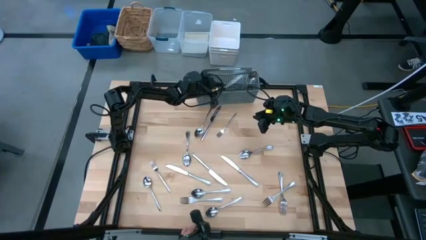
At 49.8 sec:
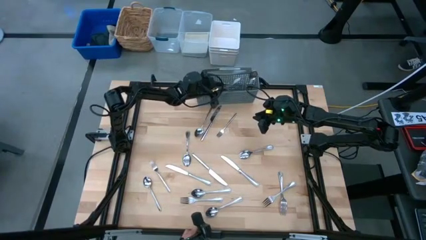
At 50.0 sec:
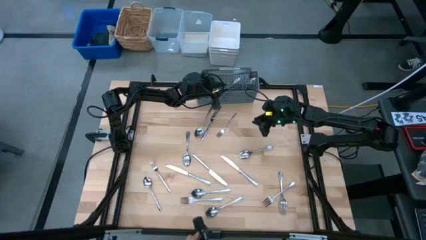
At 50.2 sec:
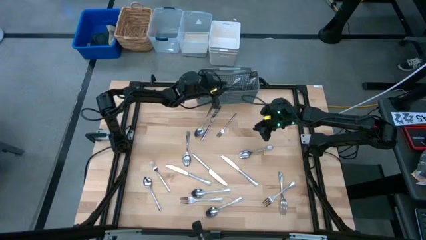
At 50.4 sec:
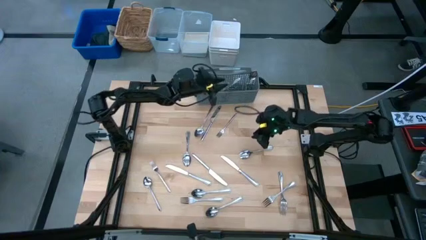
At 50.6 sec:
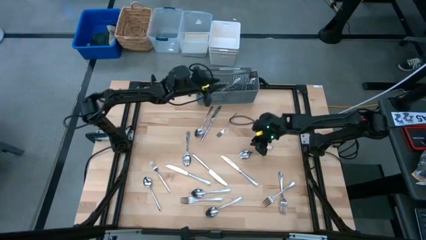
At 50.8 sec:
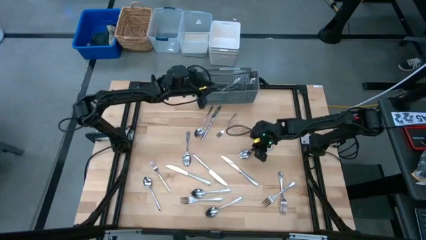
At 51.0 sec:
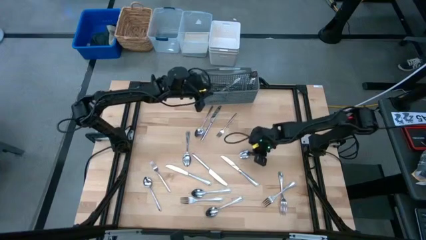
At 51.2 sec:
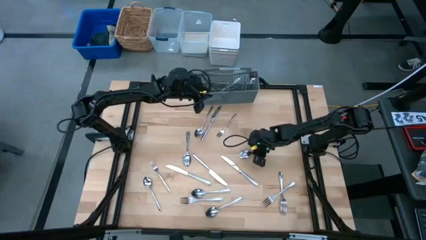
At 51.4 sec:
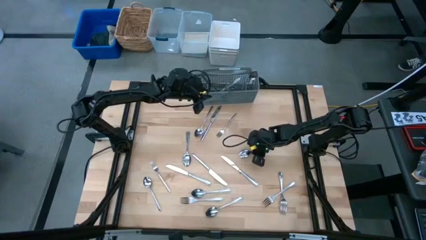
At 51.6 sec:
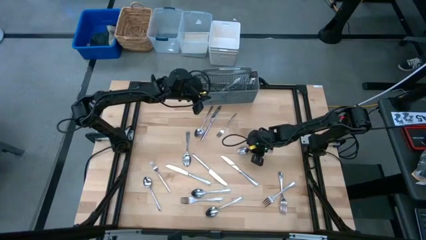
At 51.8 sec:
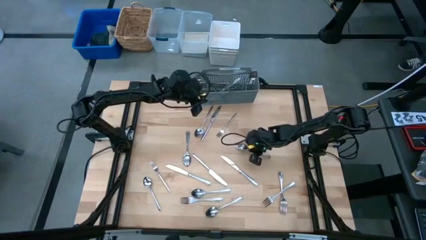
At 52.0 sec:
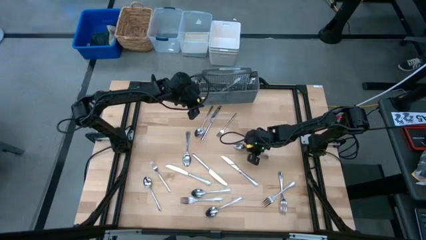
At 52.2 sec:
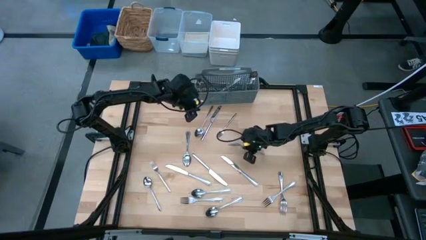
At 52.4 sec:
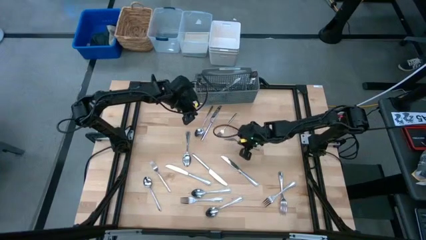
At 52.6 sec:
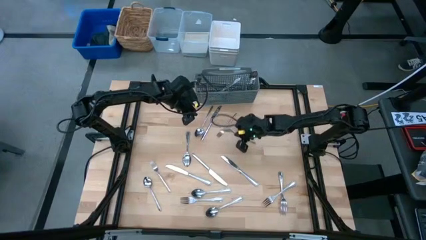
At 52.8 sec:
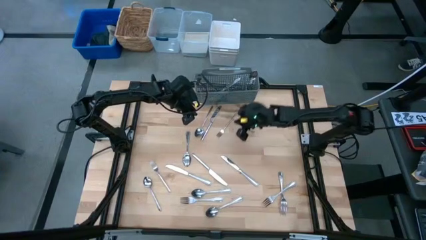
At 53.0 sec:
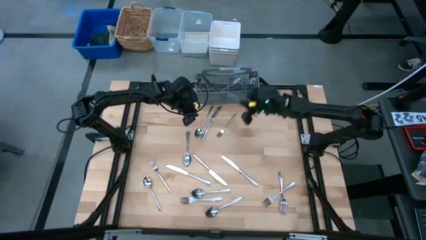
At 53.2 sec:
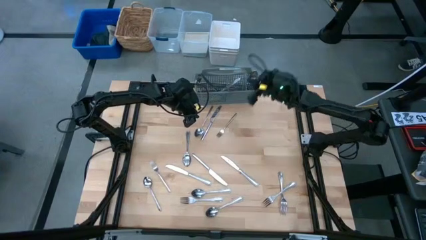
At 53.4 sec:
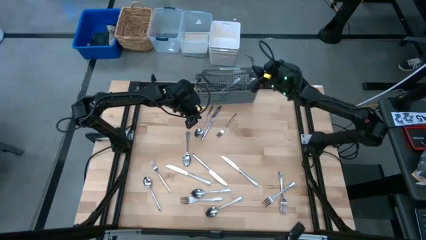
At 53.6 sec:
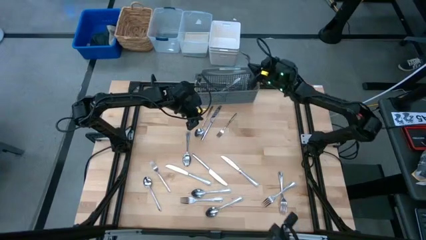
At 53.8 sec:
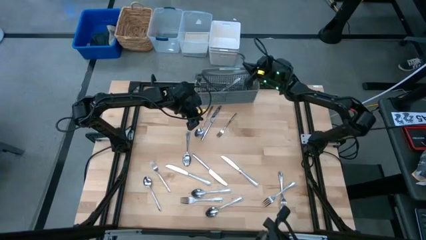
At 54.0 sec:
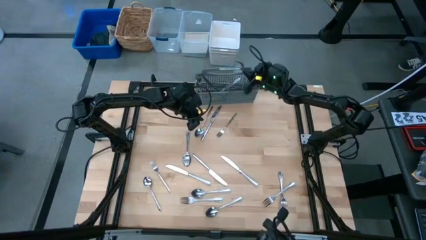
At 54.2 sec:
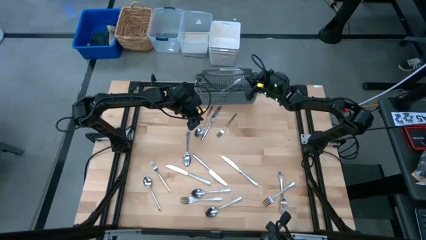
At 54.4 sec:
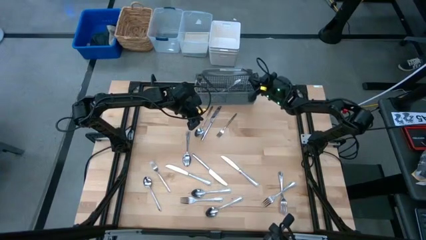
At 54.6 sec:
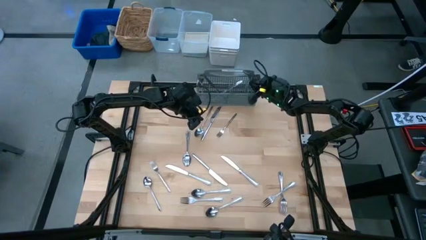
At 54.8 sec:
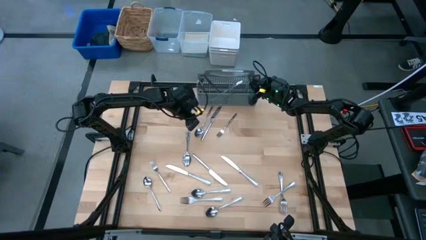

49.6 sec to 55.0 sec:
Put the silver spoon into the dishwasher utensil holder

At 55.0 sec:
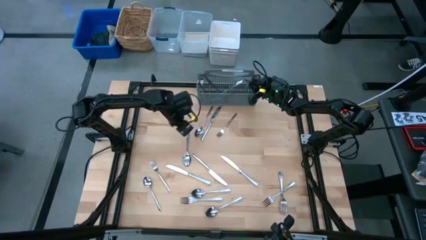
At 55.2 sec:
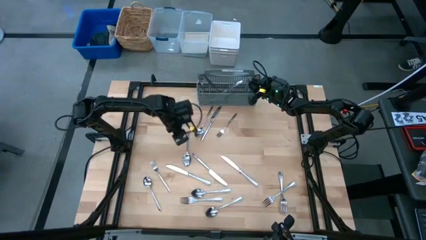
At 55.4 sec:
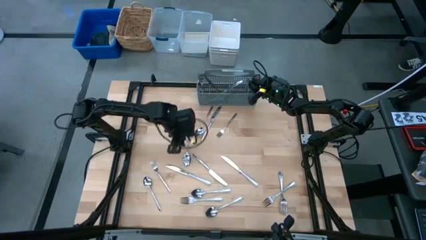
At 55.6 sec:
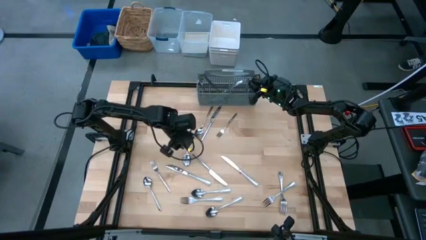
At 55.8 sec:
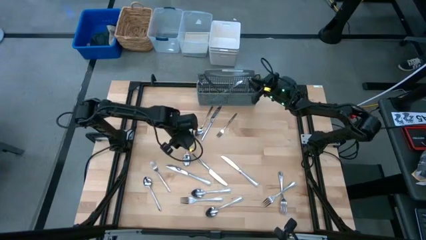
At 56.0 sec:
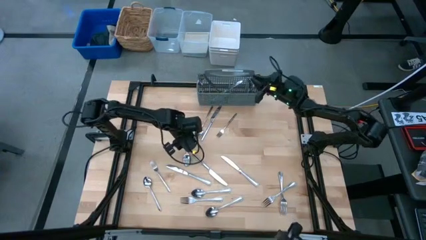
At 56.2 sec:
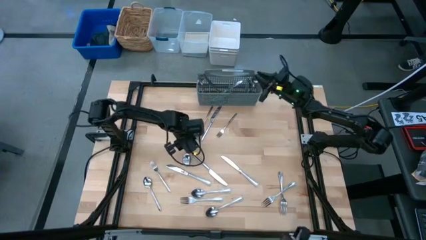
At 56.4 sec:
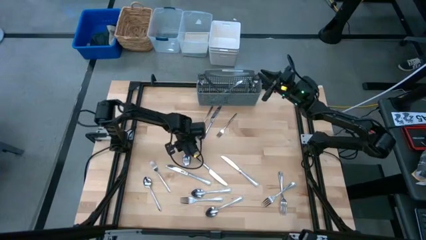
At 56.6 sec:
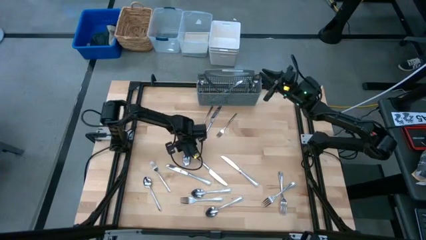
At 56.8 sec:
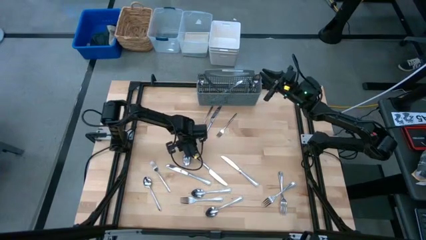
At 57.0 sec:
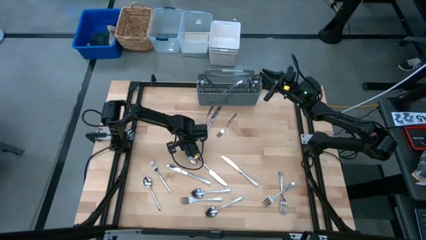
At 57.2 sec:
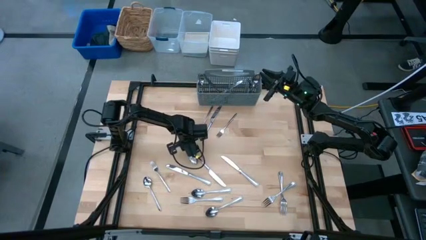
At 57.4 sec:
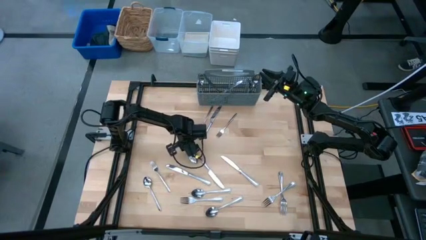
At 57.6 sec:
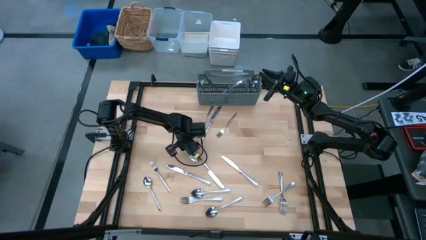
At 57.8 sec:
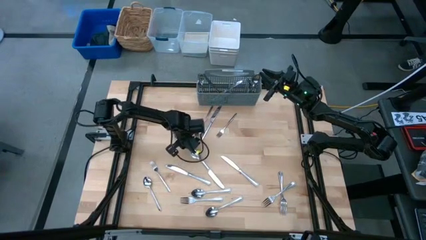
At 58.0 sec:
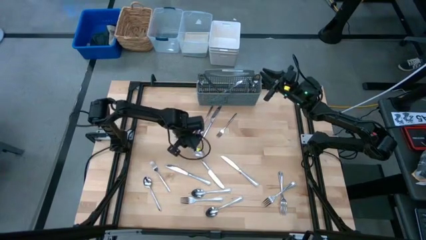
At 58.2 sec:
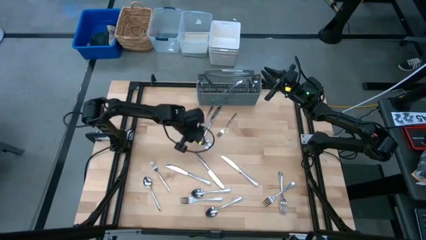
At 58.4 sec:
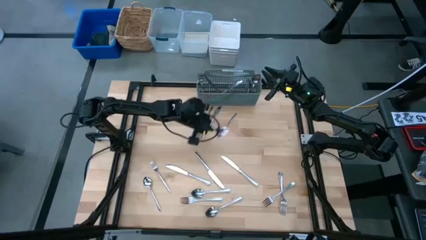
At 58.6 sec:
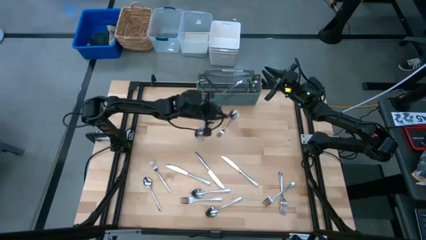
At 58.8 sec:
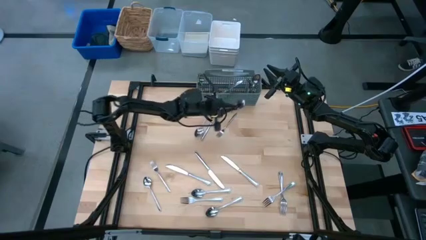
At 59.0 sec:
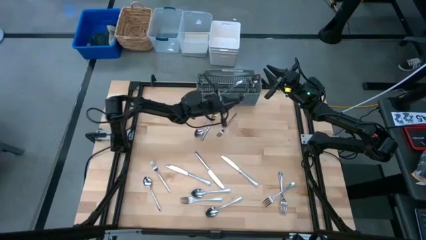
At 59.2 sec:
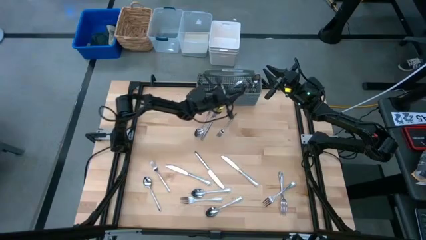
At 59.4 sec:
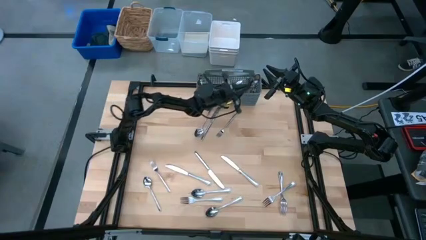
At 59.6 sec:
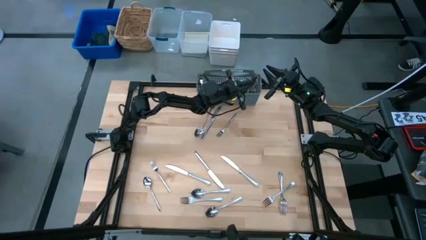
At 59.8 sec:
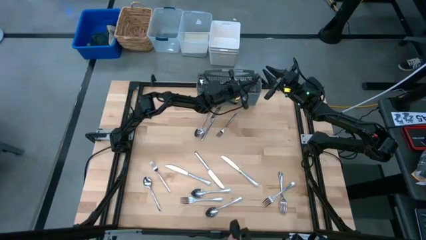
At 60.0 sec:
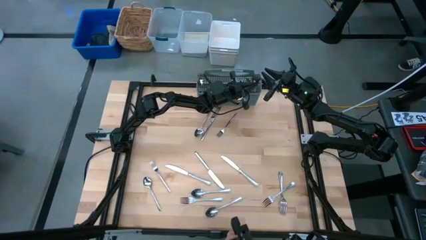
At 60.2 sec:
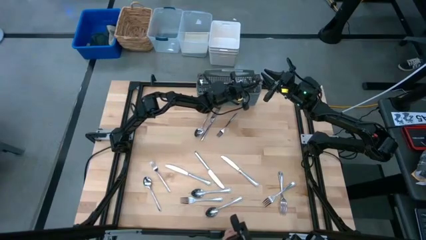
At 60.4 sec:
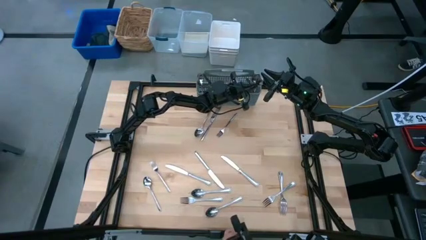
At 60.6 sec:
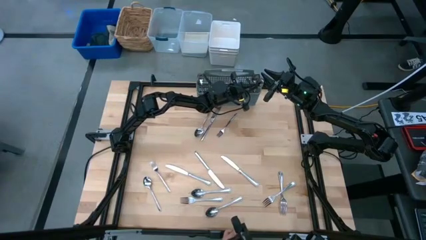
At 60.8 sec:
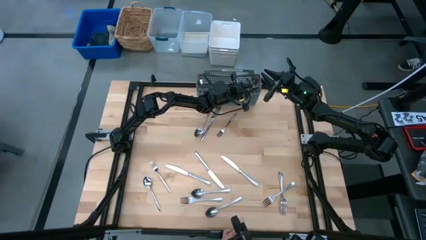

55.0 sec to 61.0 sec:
Put the silver spoon into the dishwasher utensil holder
